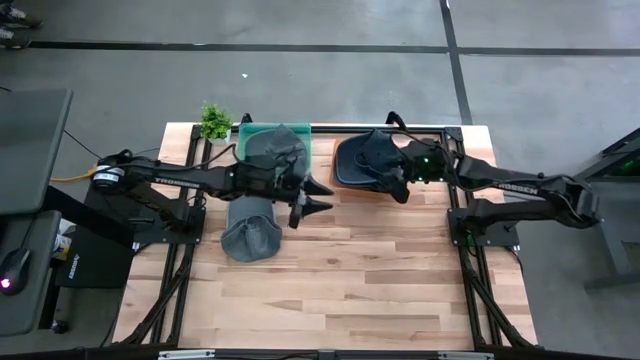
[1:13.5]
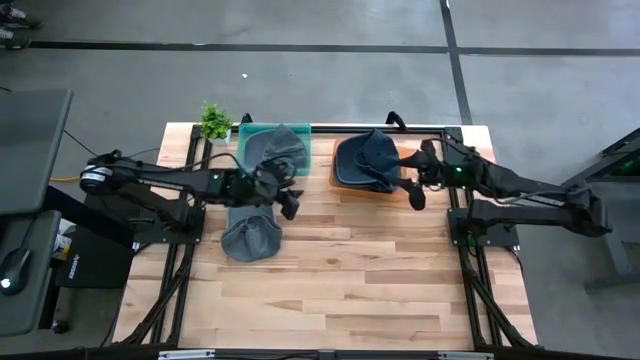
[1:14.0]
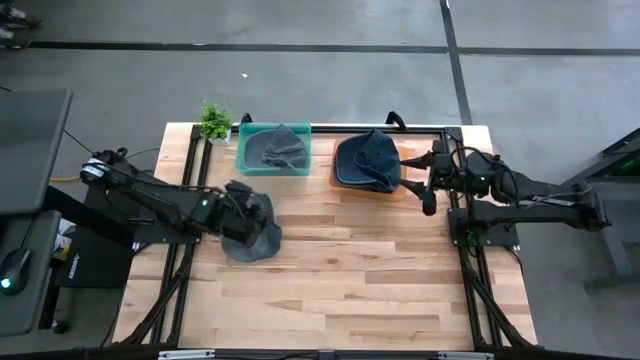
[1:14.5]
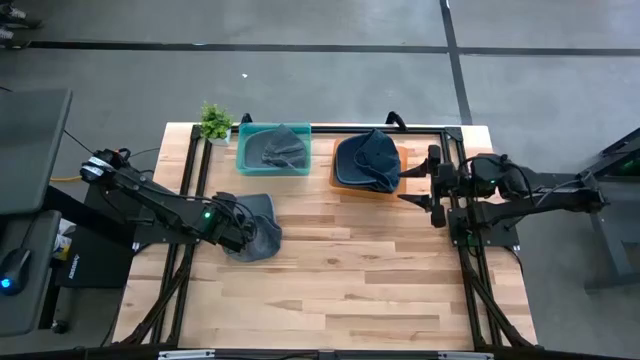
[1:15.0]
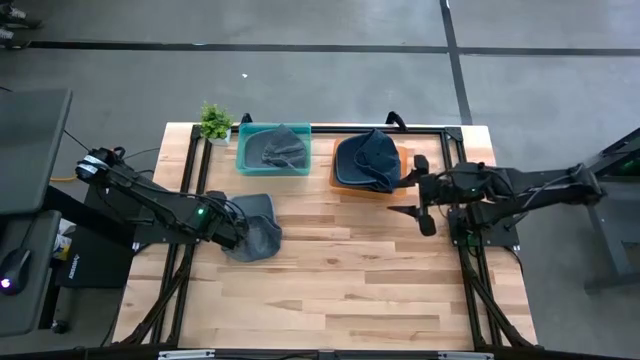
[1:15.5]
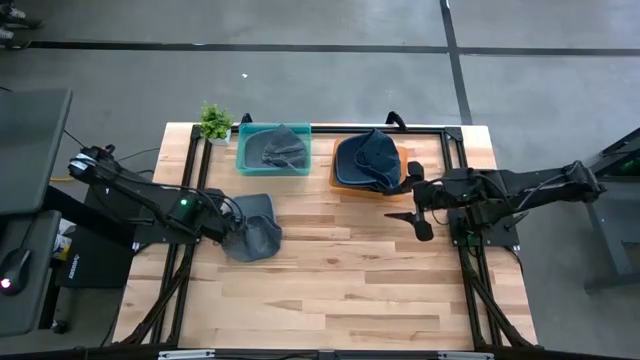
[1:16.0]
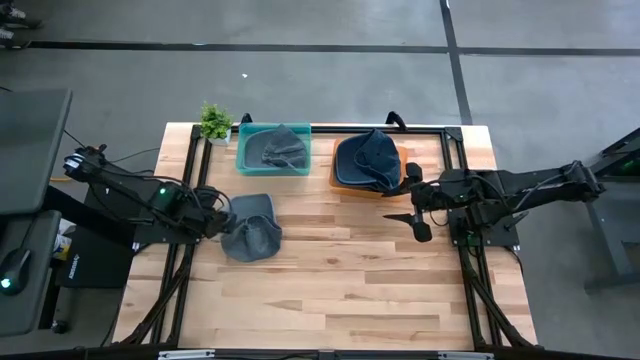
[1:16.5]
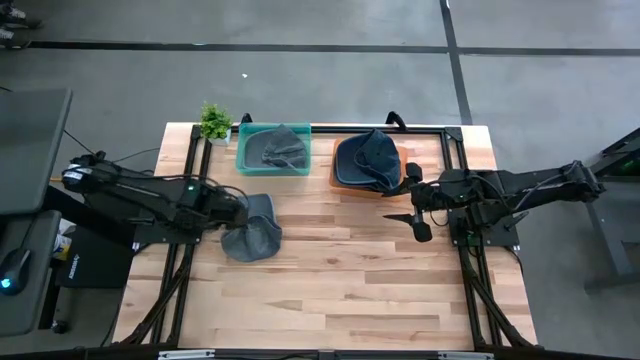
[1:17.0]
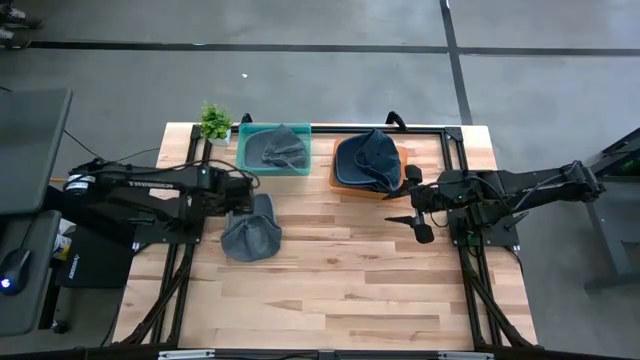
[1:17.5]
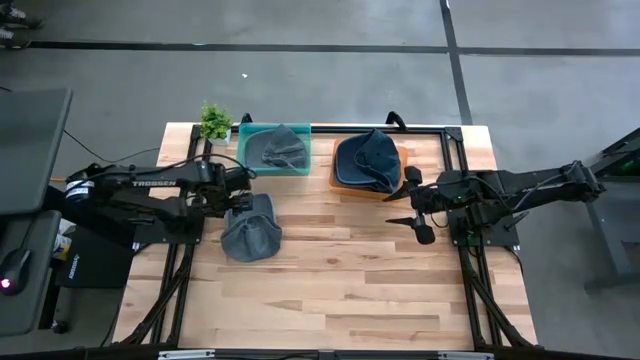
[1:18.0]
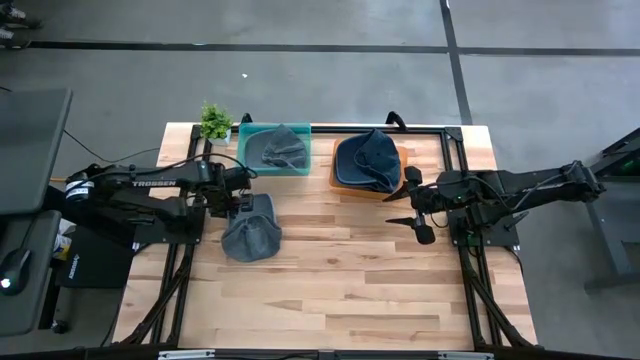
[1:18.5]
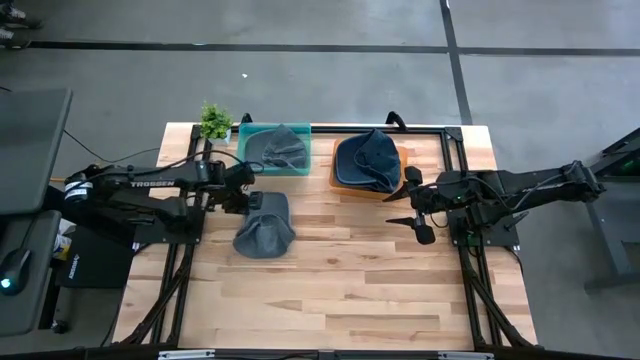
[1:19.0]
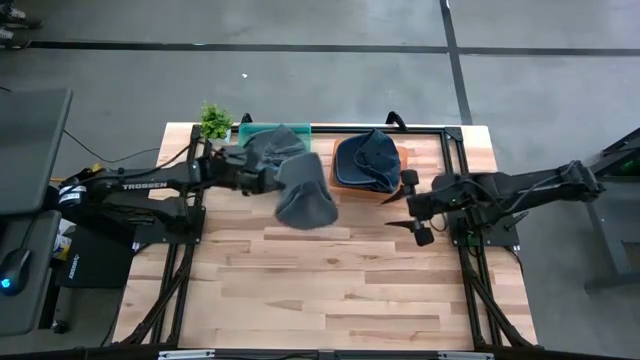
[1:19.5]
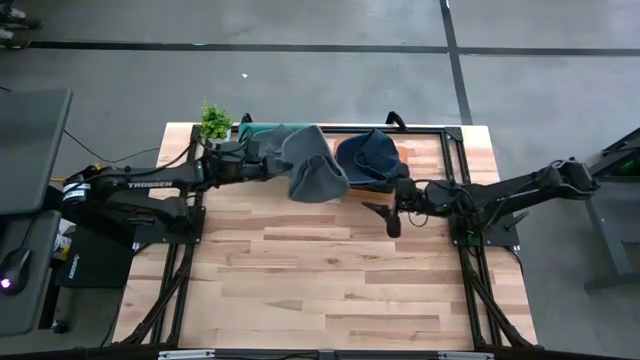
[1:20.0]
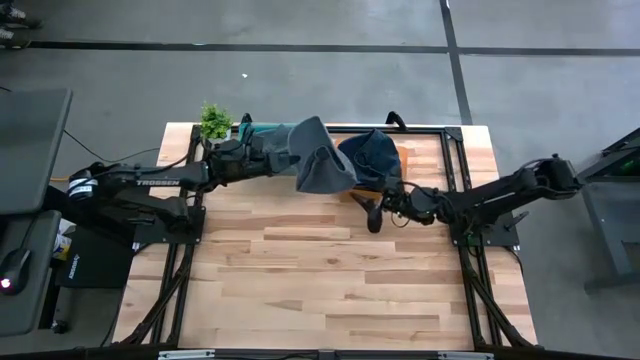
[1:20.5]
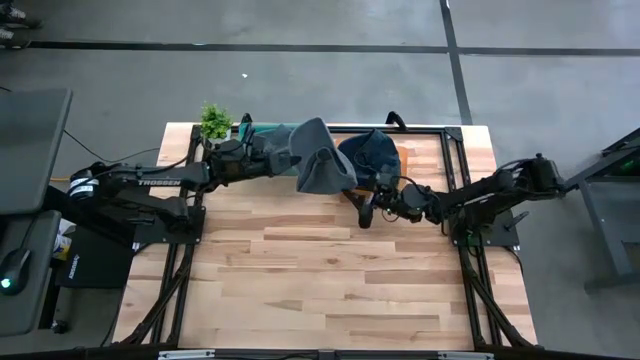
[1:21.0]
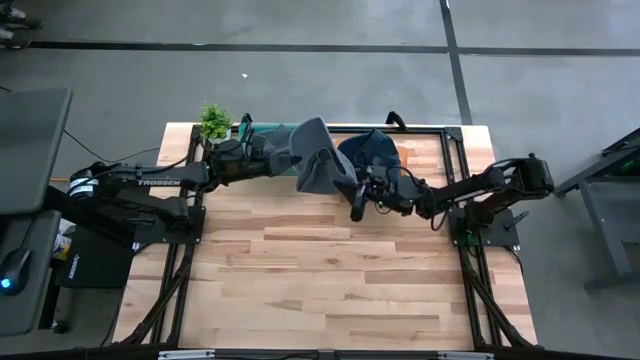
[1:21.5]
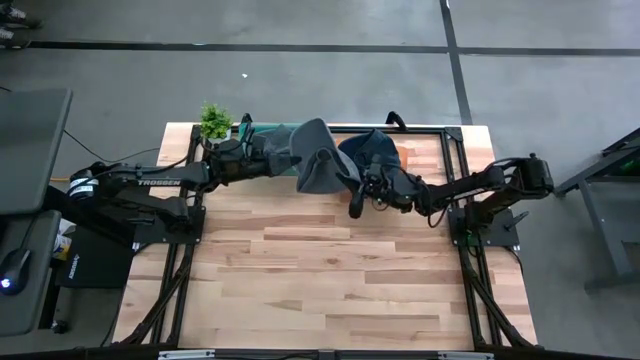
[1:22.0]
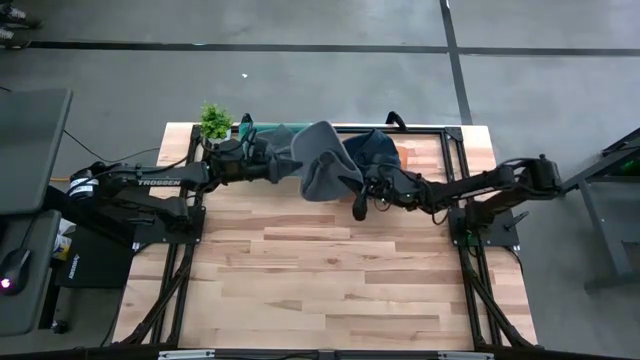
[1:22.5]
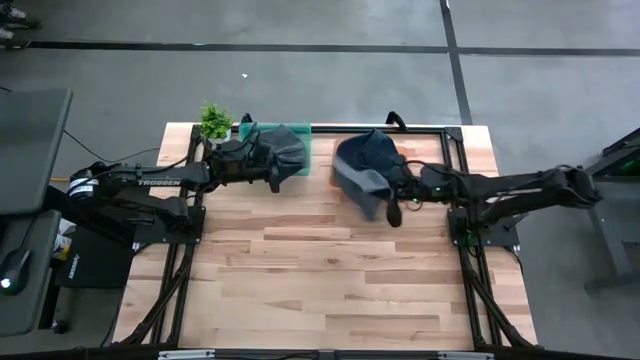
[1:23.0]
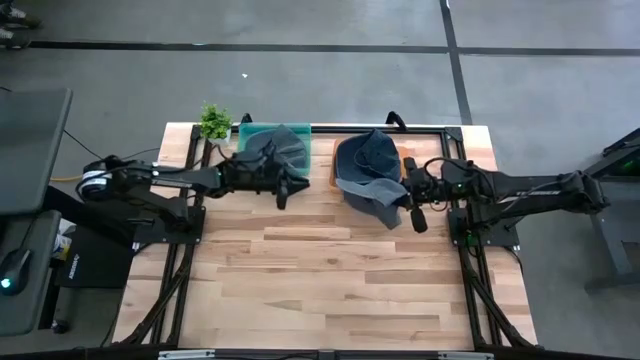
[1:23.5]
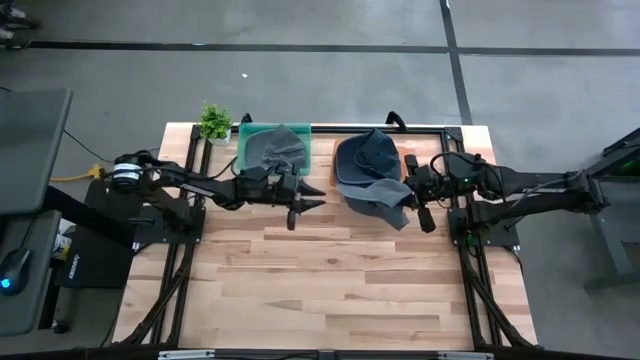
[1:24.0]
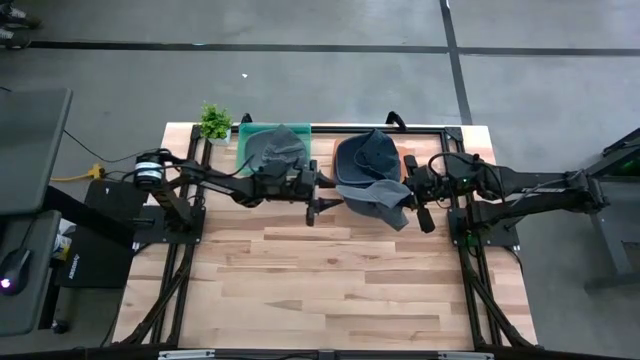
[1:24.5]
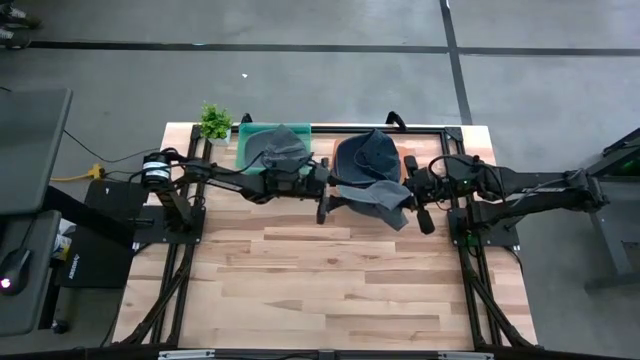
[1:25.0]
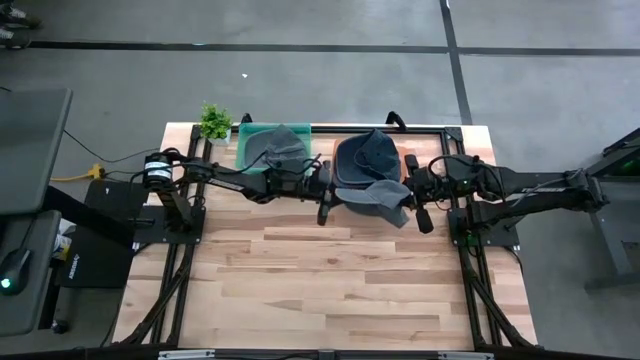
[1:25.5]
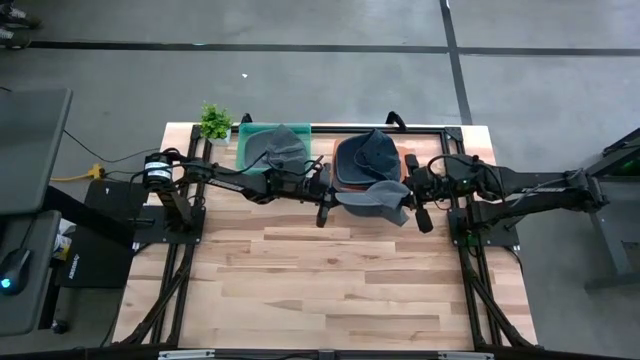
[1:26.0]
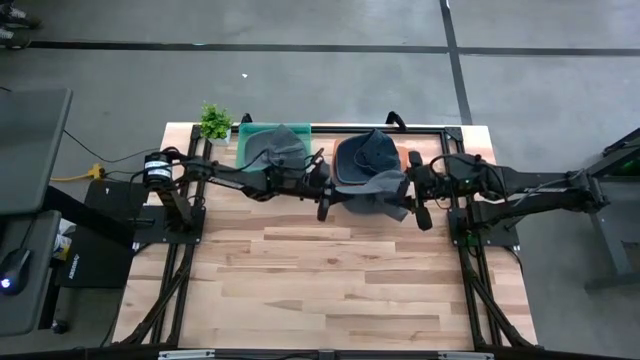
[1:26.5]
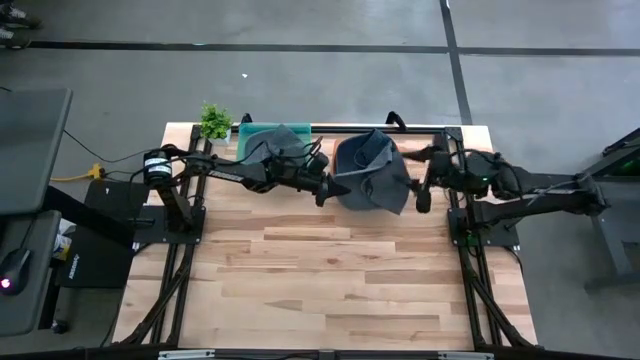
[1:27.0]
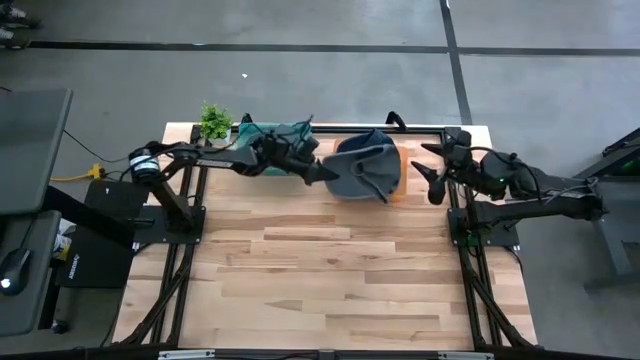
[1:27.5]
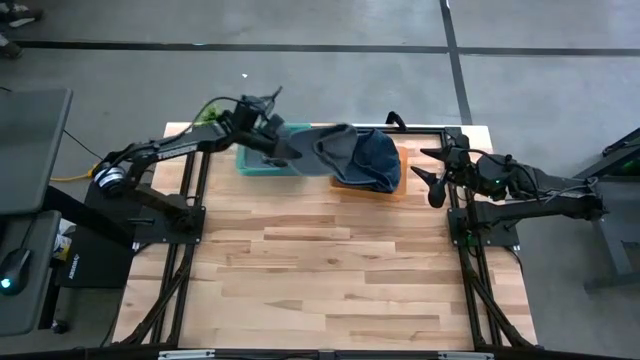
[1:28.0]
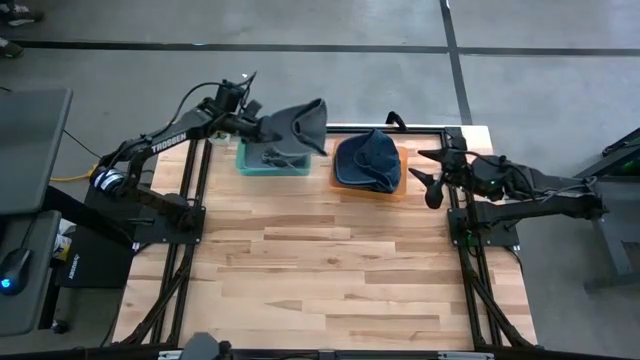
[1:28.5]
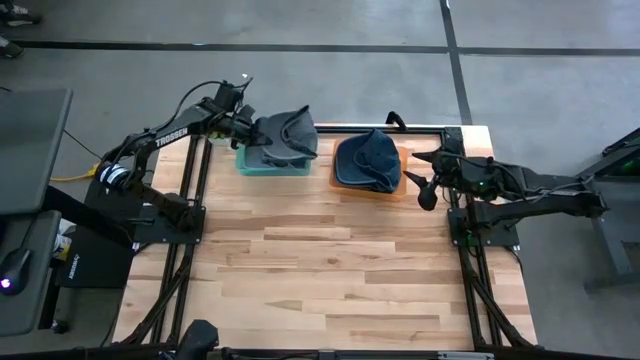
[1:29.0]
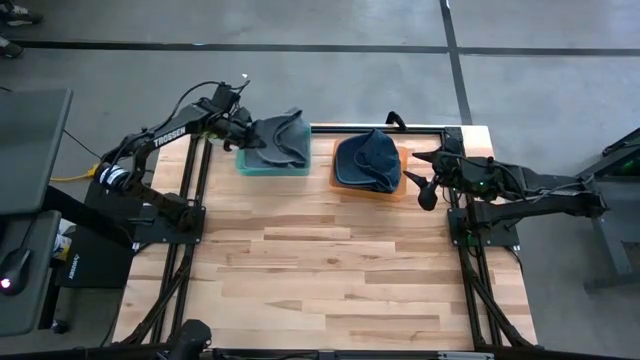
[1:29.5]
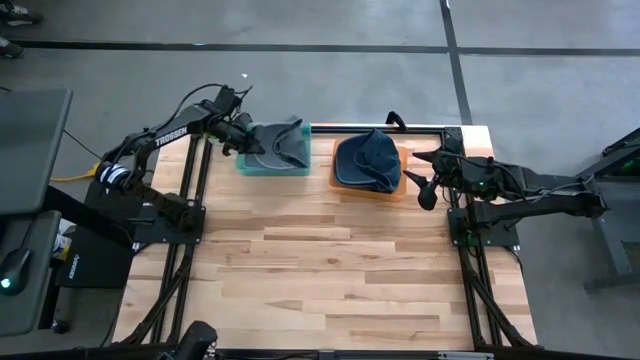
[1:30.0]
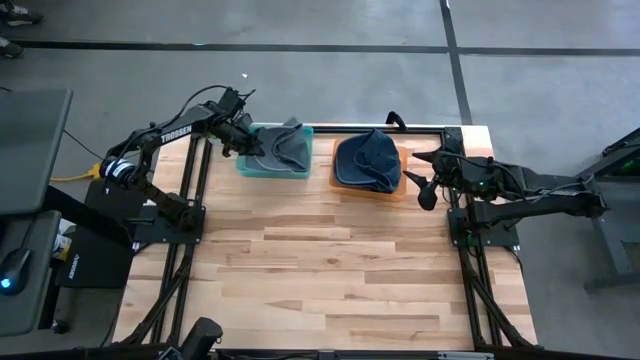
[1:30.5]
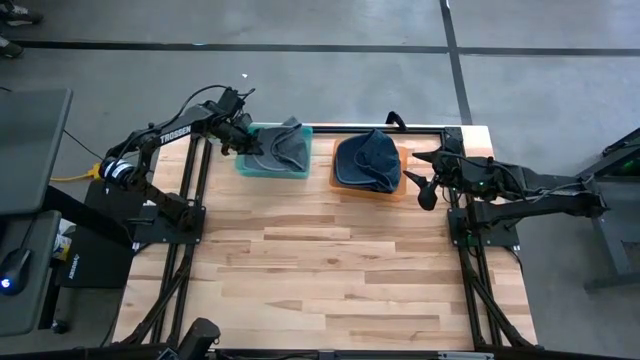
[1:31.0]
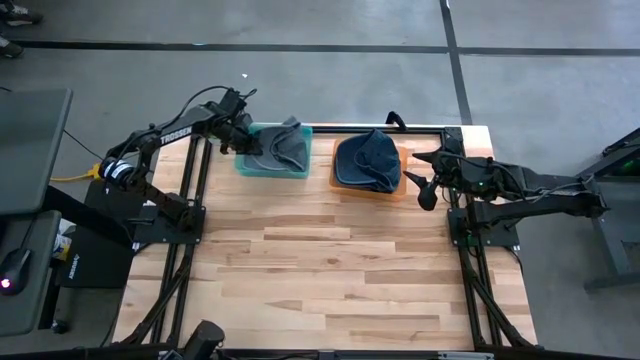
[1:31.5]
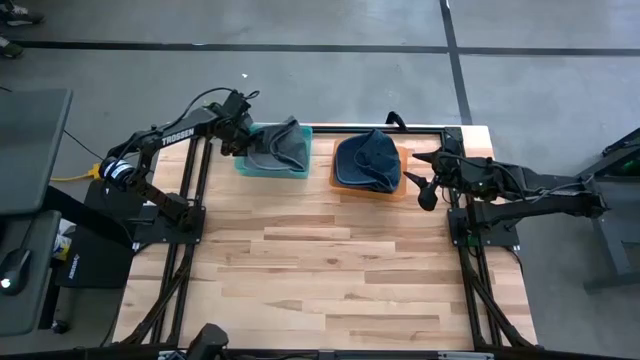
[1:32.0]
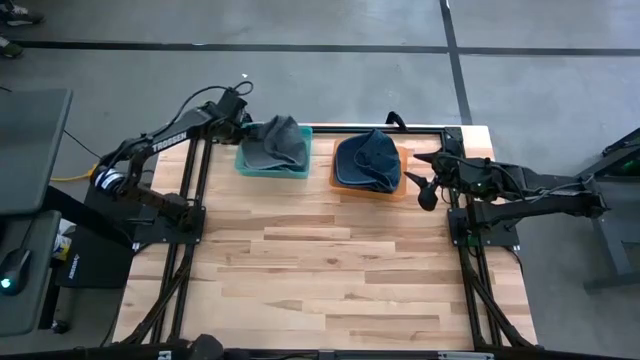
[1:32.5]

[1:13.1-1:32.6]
Task: Pick & Place hat
Put the gray cap into the green bin

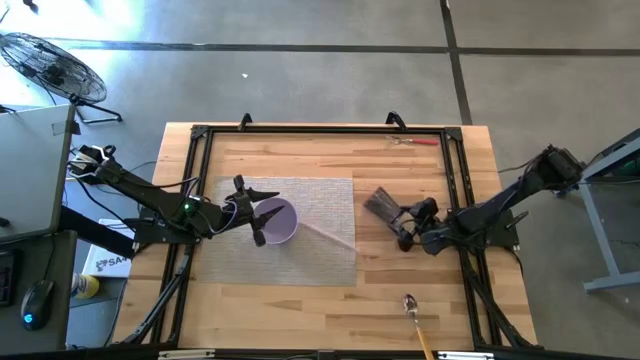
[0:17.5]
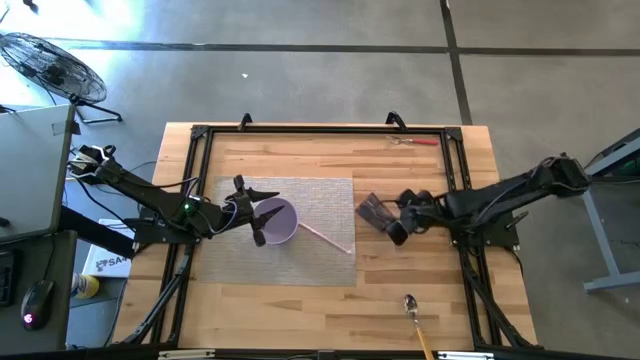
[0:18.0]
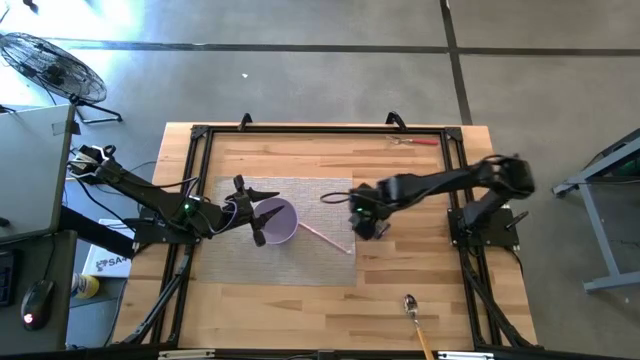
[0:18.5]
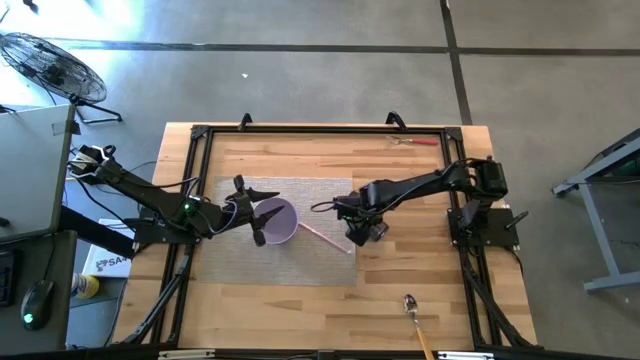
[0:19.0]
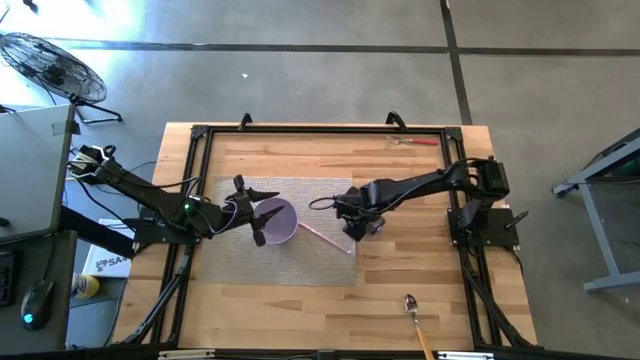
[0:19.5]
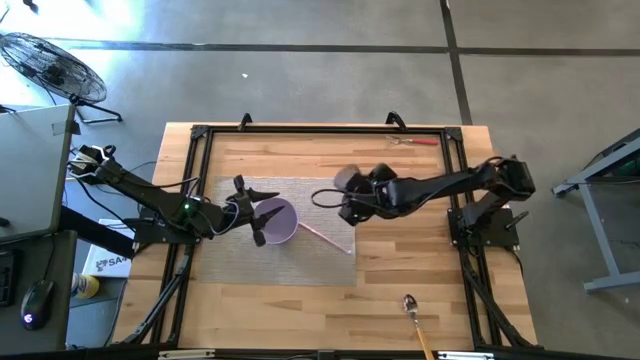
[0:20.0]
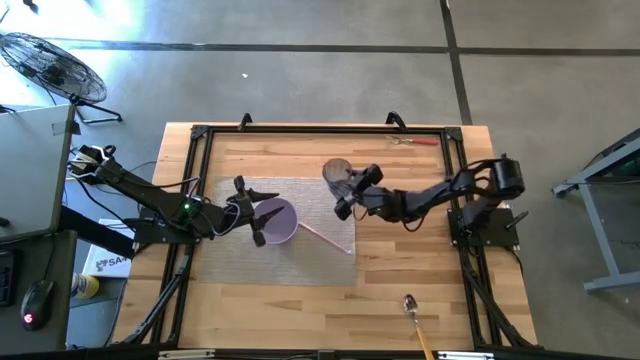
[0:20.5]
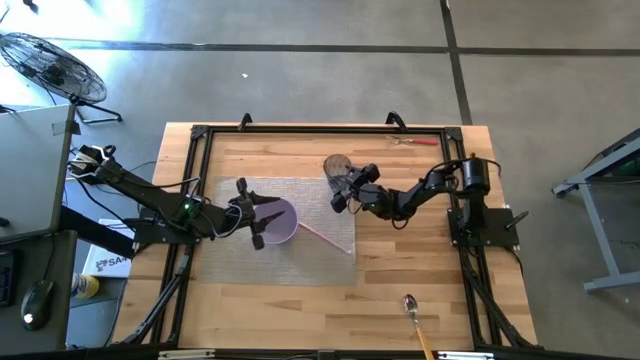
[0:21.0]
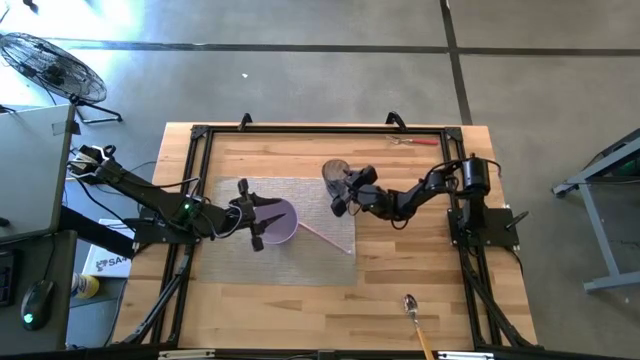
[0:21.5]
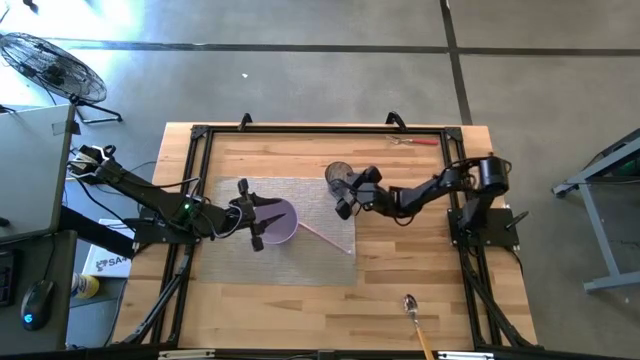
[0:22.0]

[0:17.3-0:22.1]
Task: Pick & Place Utensil
Put the blue glass on the gray mat to the top right of the purple bowl
